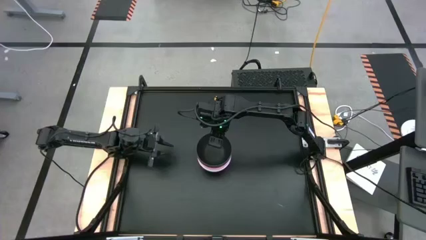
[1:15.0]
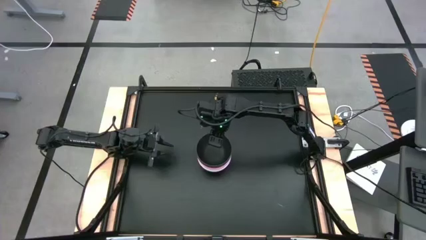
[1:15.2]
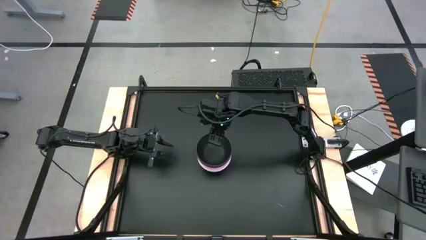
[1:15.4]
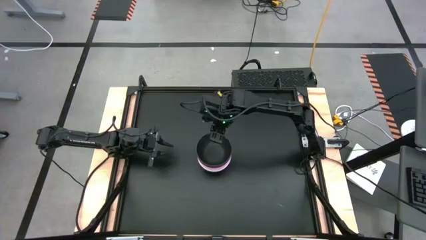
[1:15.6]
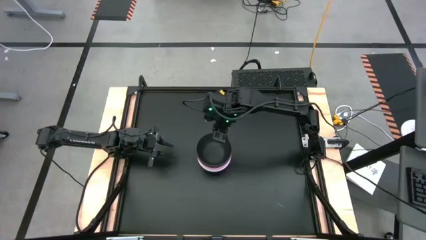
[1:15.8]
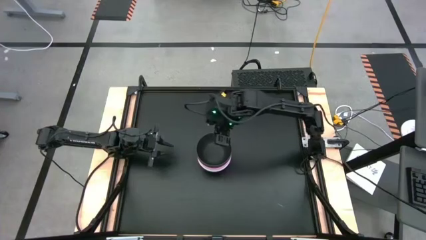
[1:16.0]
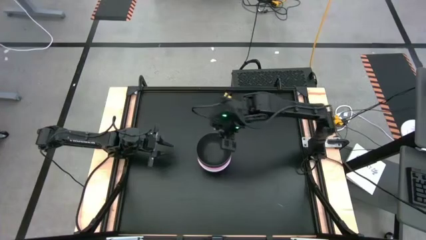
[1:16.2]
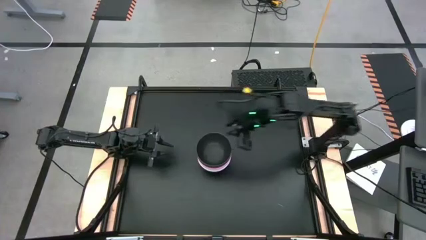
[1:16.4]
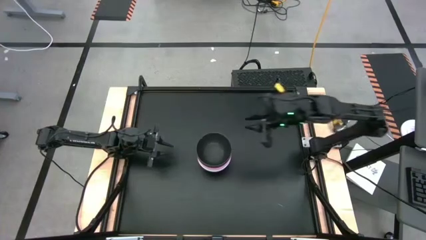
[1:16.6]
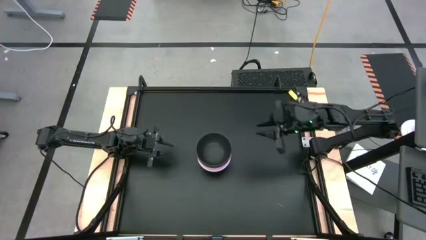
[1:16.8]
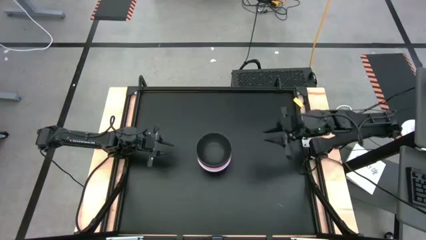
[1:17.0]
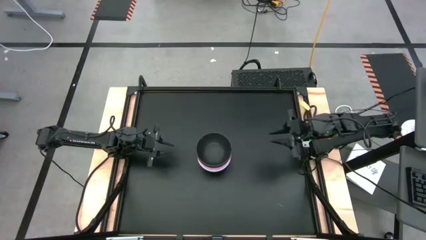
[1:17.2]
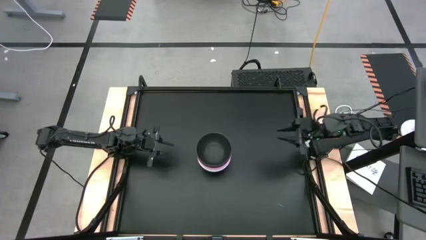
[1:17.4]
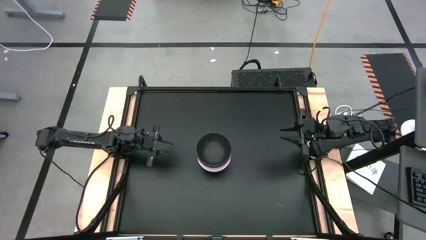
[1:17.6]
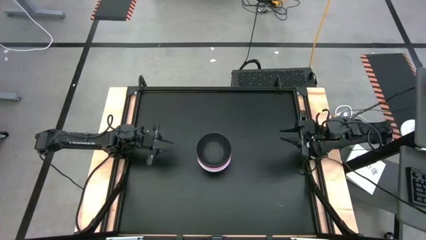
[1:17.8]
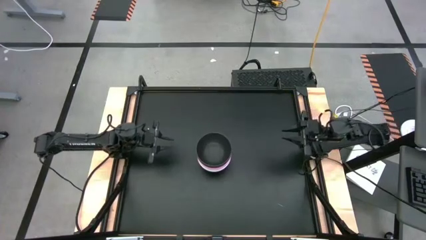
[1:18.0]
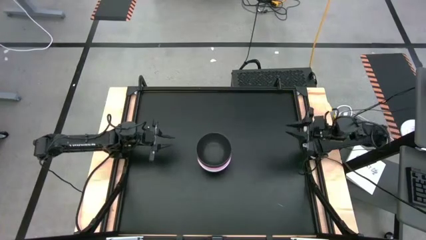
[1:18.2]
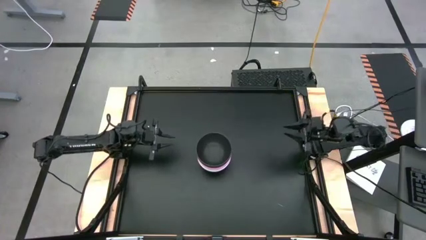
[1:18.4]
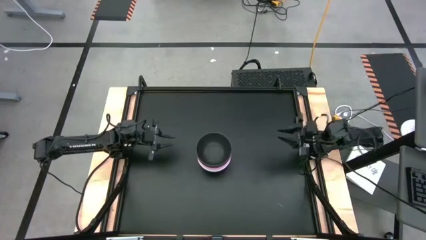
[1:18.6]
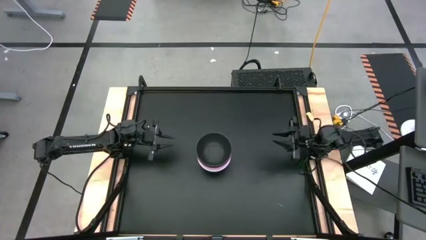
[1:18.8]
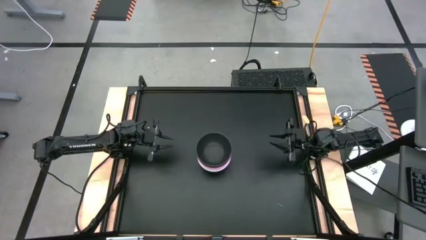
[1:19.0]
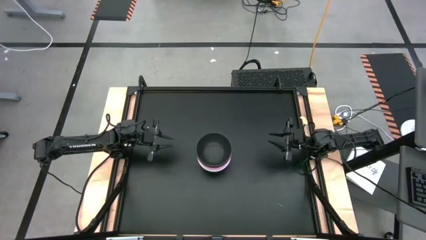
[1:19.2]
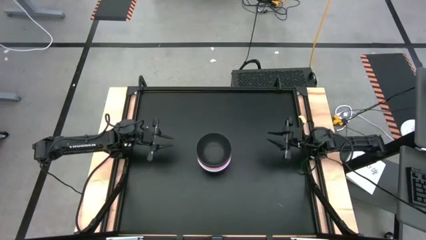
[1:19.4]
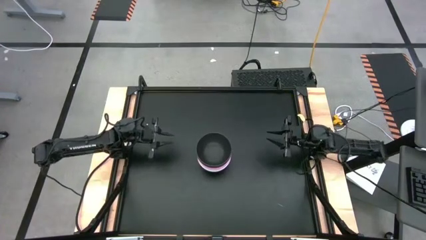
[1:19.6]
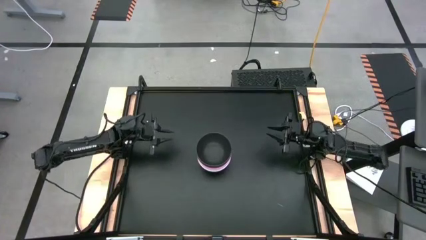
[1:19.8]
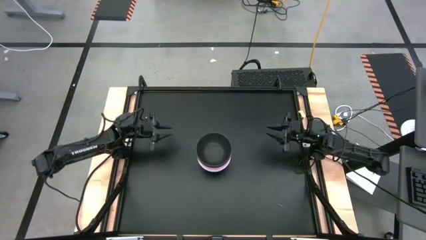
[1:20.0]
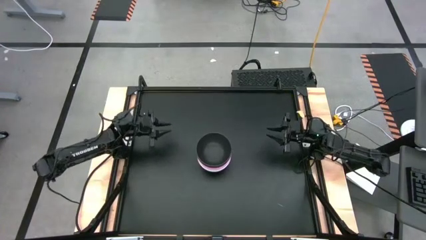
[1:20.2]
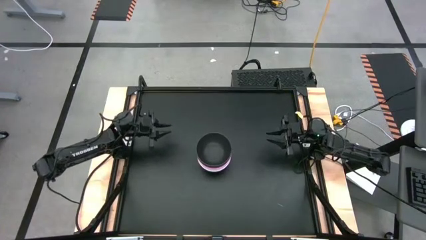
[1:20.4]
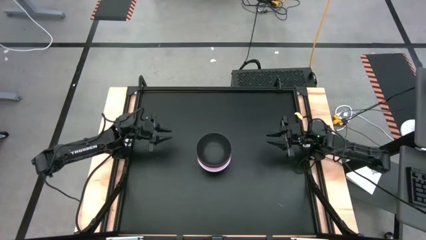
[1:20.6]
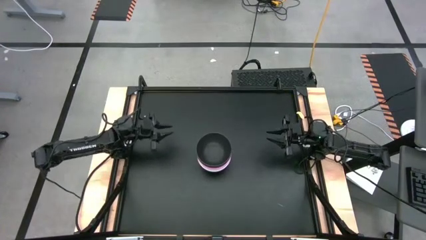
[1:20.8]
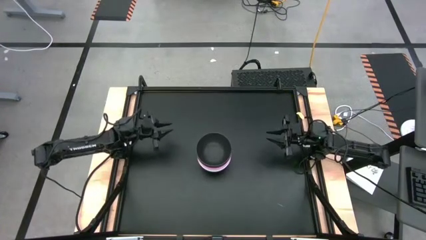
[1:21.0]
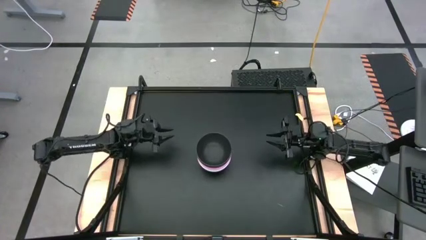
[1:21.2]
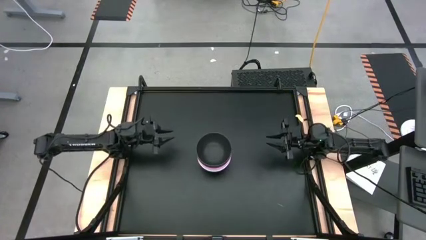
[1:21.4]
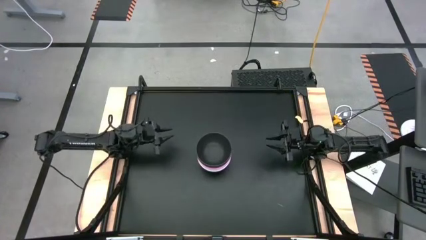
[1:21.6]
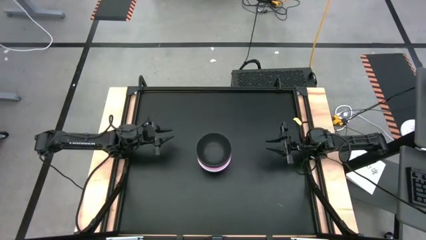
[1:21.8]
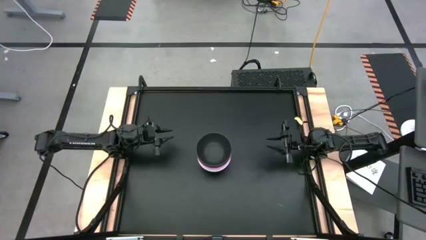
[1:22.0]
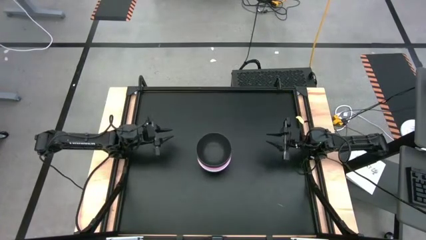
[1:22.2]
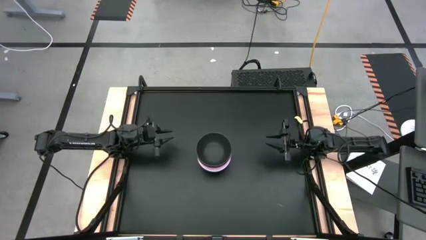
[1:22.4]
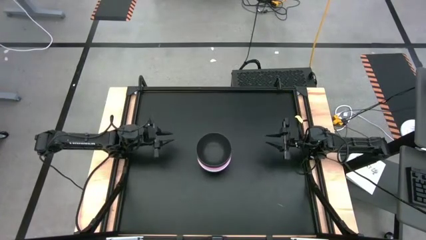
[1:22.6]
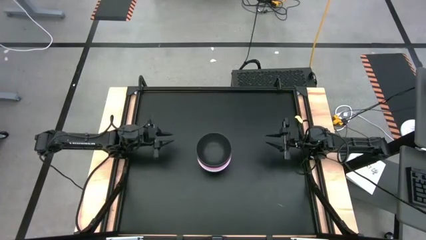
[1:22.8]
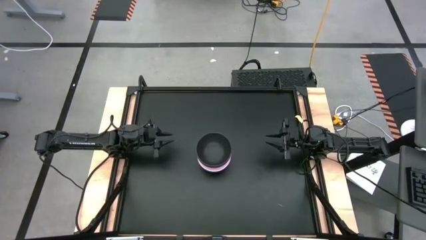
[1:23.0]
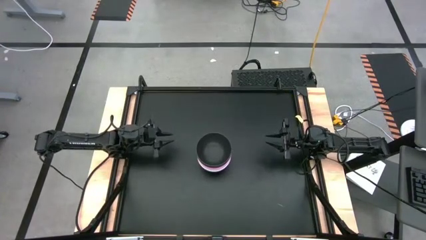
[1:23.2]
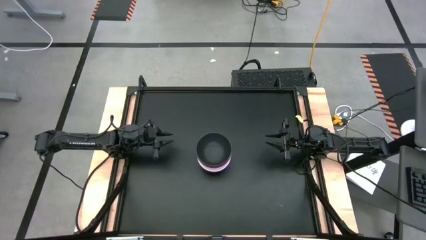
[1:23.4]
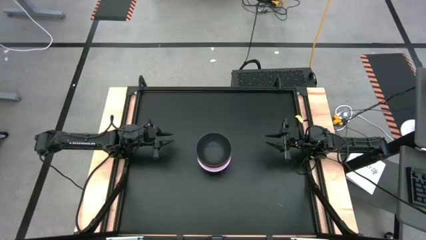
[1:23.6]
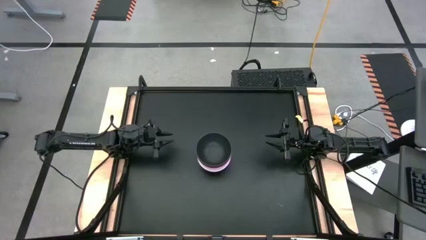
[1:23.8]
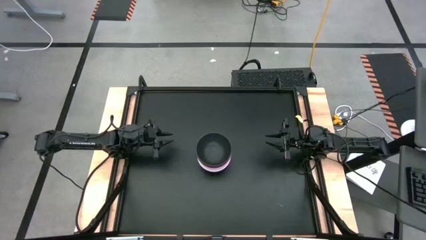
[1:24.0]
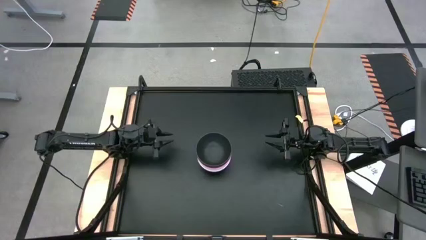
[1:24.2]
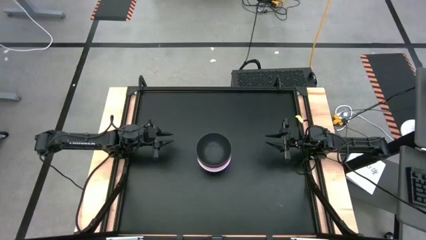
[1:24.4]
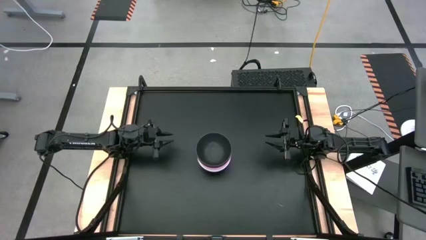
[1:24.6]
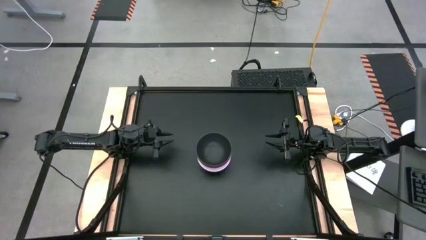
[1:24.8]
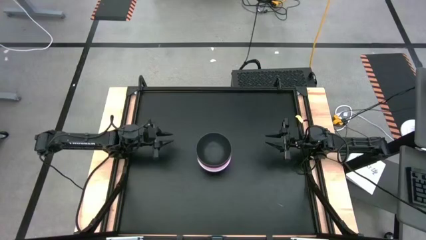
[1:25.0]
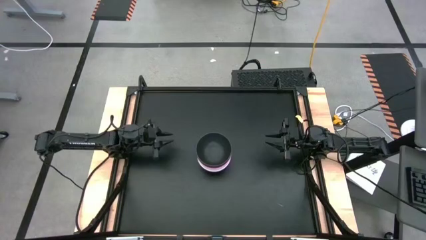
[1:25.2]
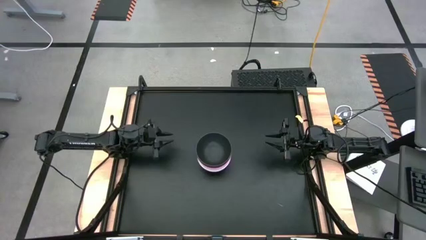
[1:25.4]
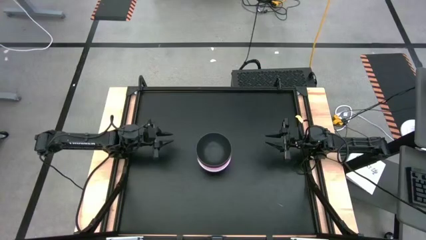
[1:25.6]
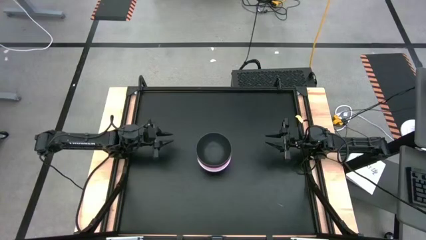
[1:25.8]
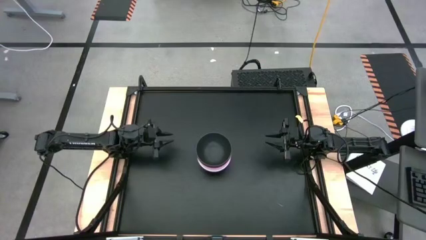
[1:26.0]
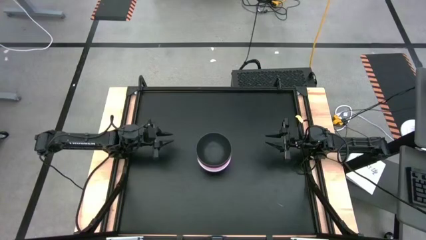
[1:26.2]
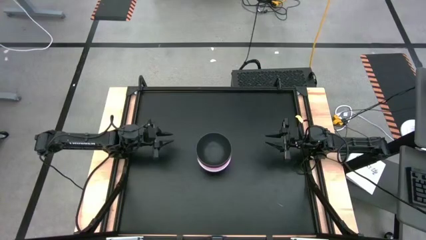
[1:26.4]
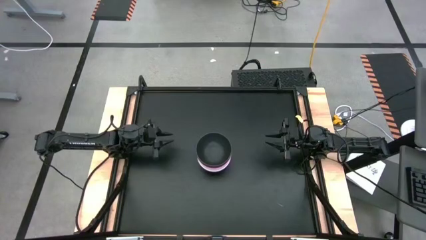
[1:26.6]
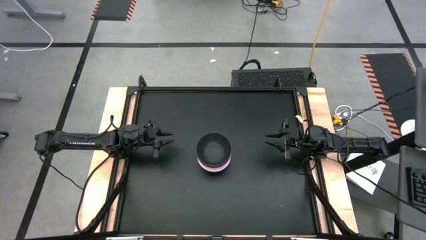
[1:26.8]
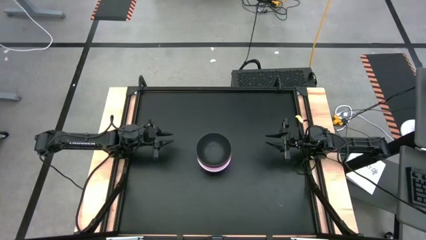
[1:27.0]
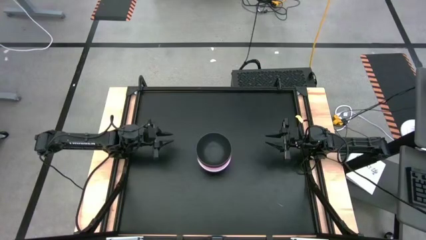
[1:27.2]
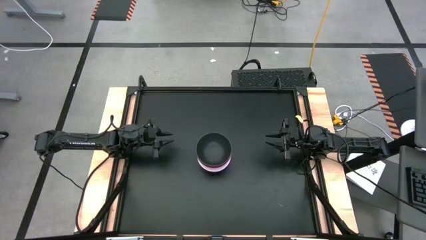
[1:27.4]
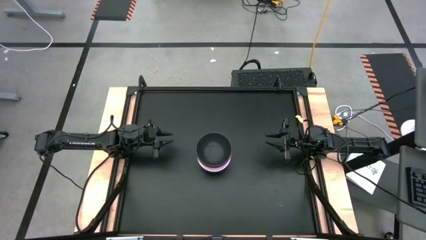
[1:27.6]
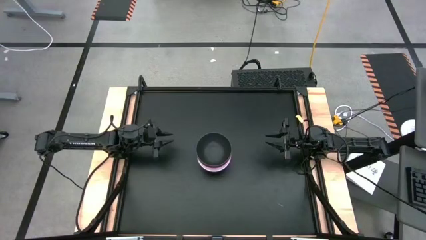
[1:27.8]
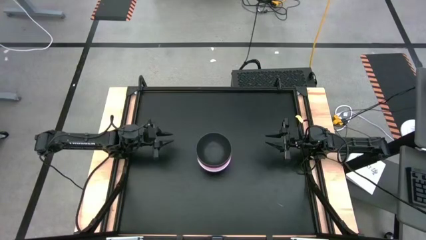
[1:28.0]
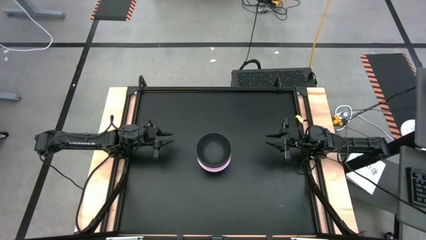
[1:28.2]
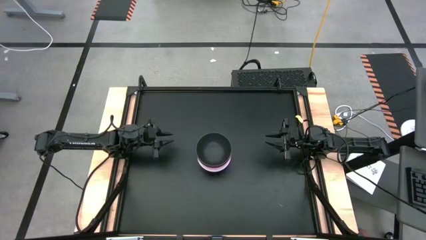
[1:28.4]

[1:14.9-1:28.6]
Task: Nest bowls inside each other
Return to Home Position

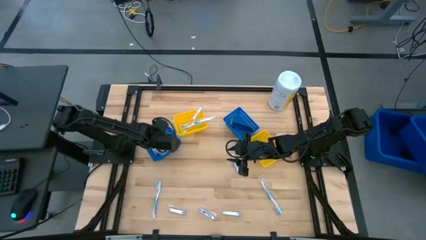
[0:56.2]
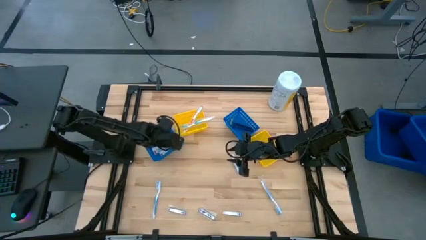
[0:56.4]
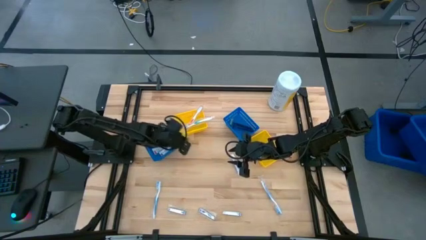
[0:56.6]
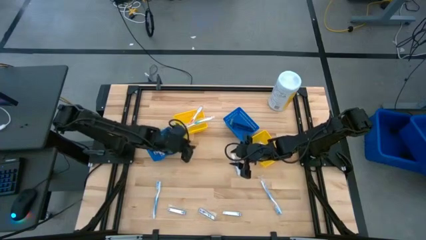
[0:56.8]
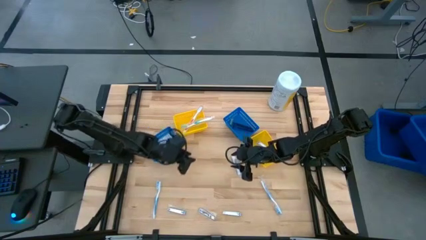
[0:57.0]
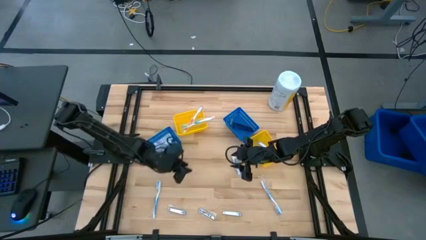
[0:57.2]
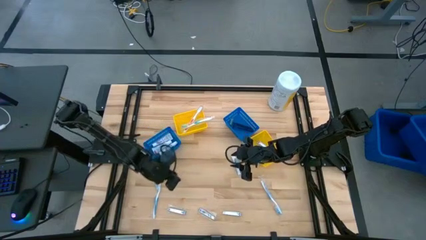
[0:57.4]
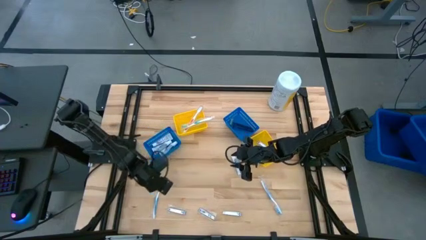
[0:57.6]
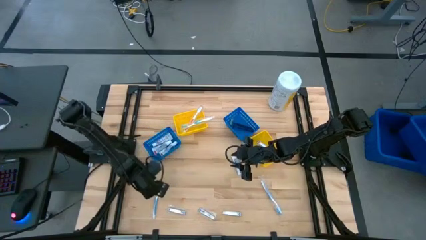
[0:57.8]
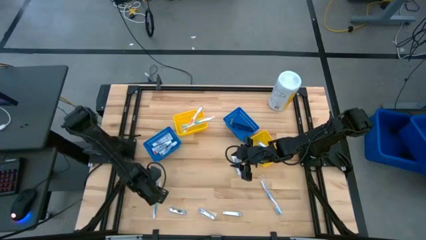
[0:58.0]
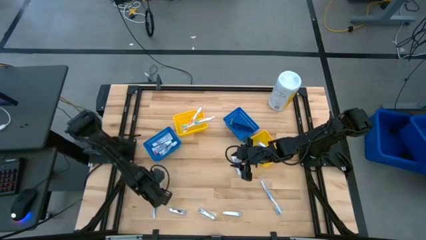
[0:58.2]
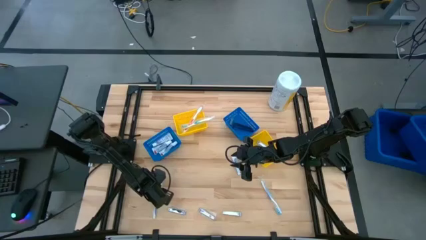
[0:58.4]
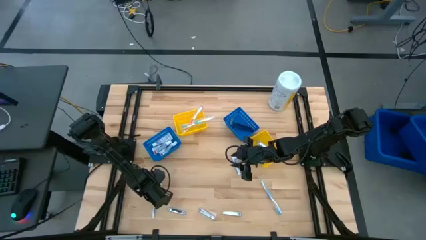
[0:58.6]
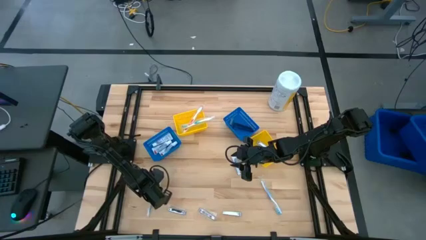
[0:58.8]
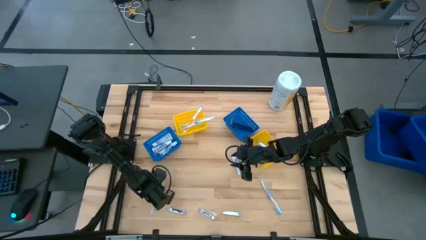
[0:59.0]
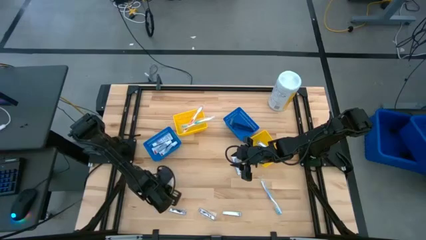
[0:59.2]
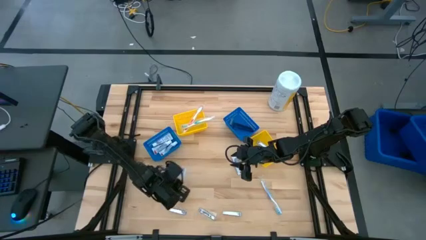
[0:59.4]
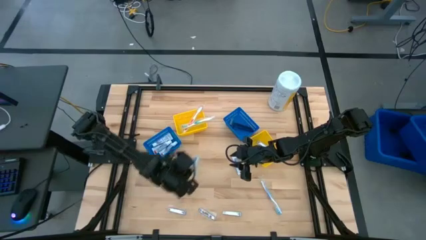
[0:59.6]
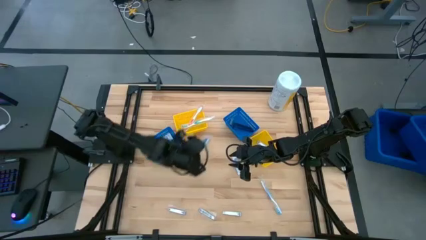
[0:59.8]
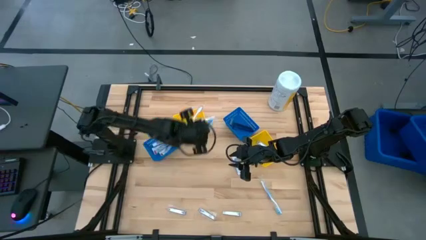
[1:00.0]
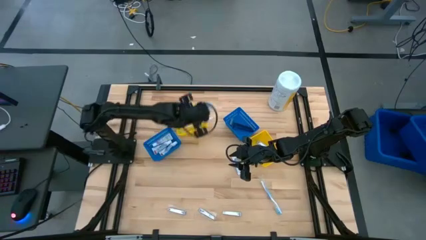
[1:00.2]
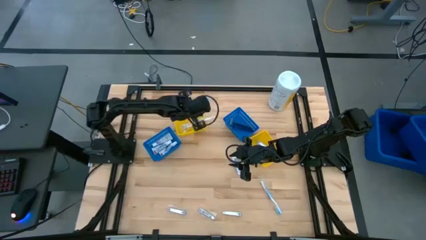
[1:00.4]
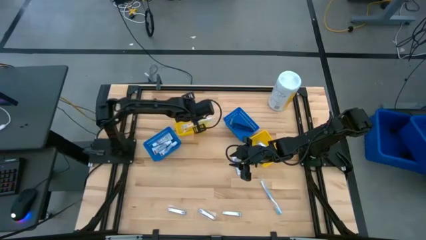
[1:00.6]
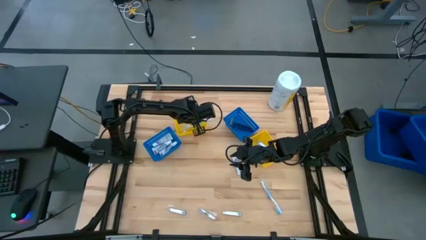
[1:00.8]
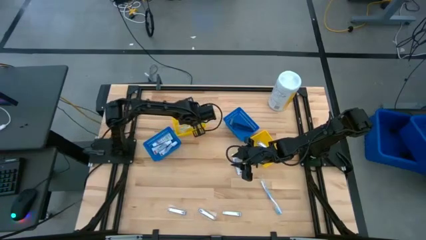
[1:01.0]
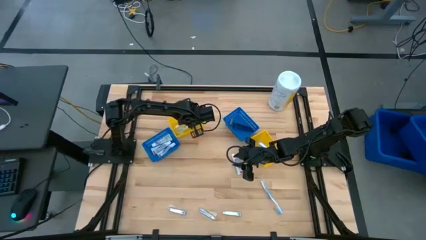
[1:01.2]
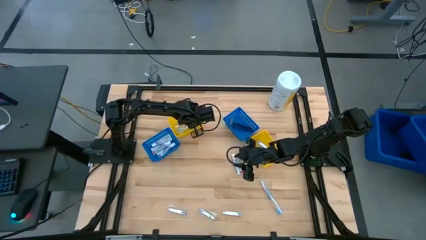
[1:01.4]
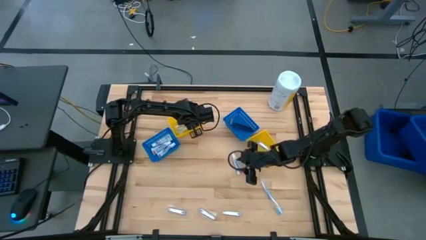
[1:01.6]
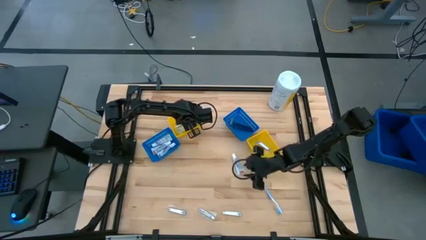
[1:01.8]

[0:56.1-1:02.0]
Task: Pick & Place Travel size toiletries
Put the blue toothbrush into the left yellow bin
